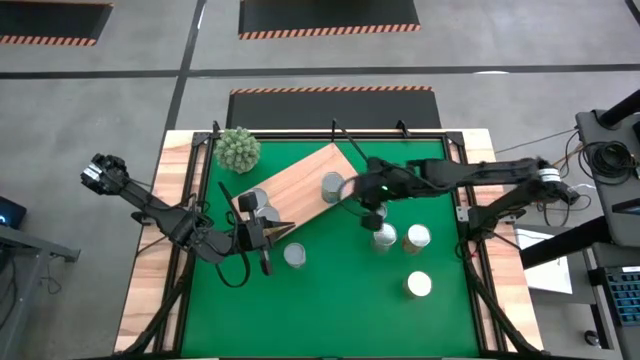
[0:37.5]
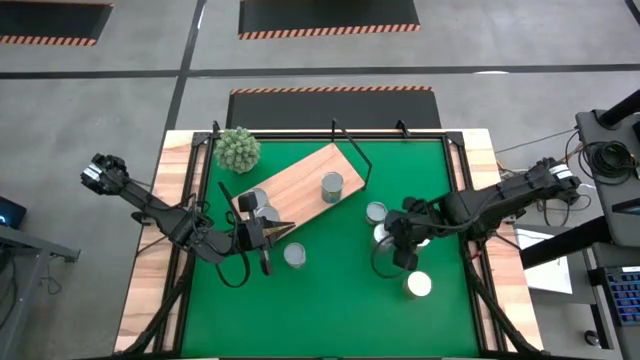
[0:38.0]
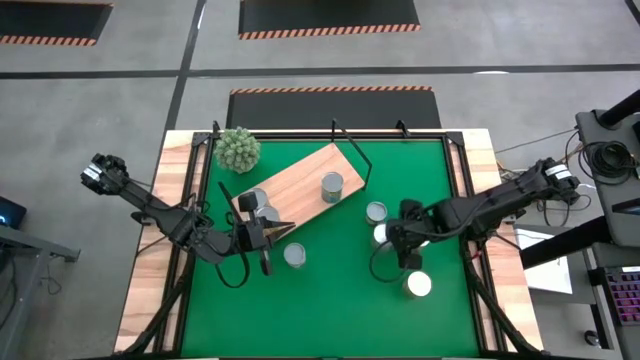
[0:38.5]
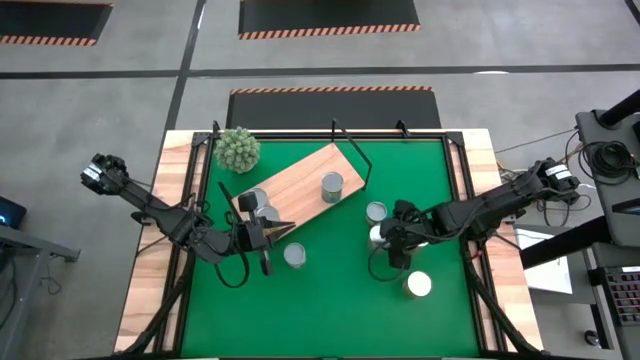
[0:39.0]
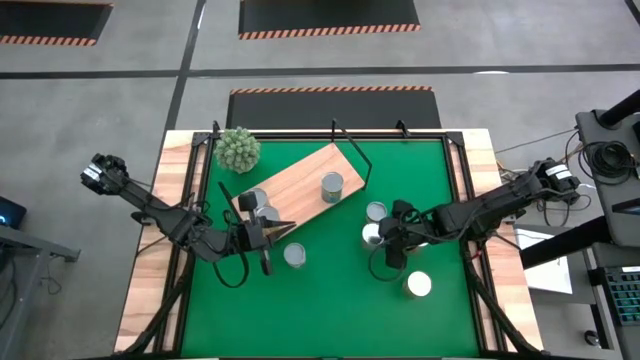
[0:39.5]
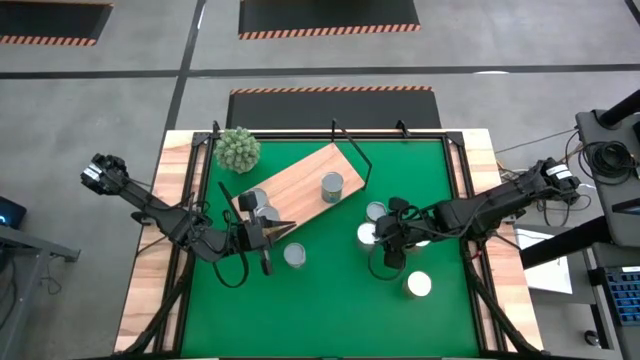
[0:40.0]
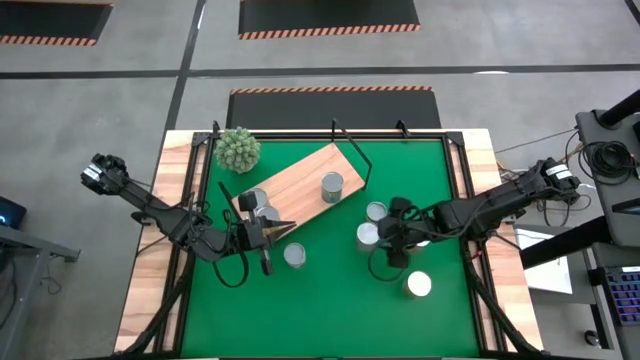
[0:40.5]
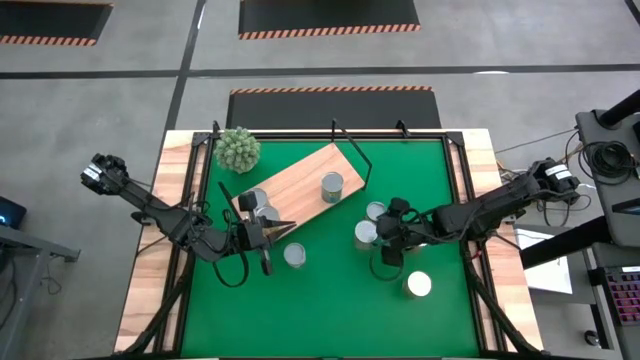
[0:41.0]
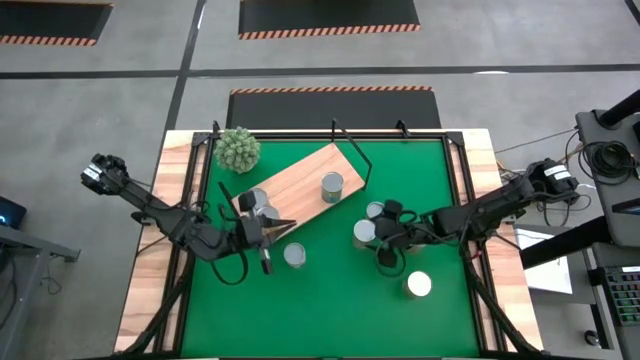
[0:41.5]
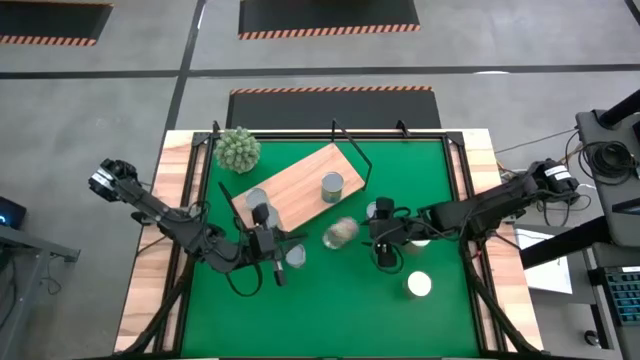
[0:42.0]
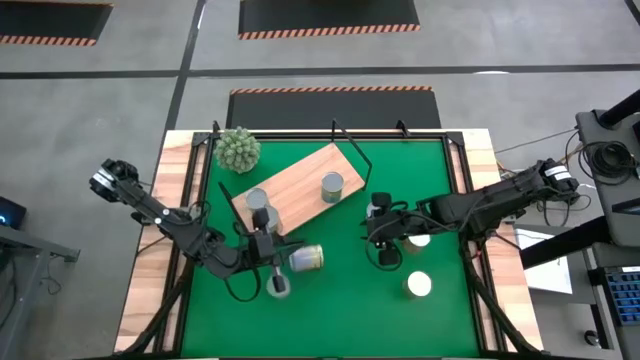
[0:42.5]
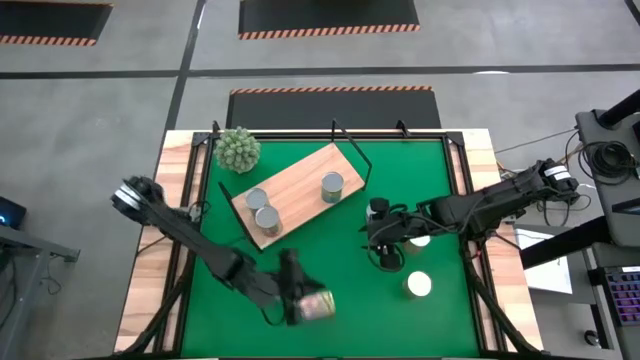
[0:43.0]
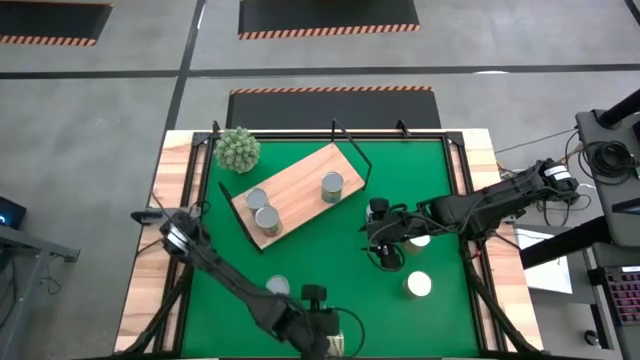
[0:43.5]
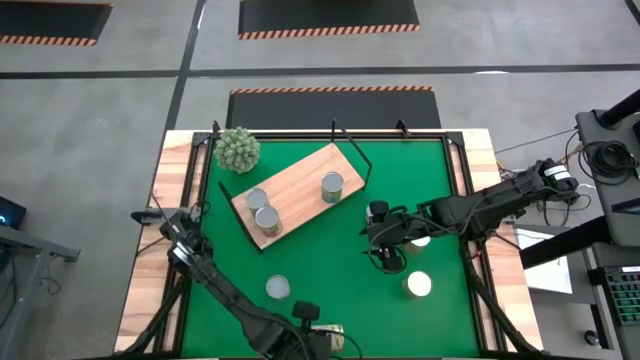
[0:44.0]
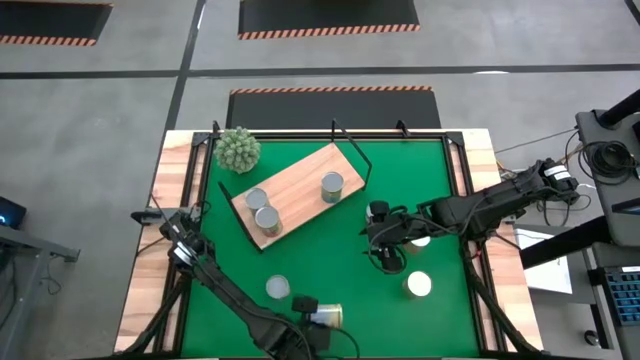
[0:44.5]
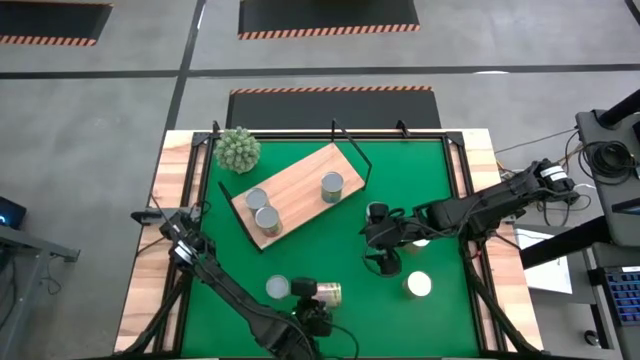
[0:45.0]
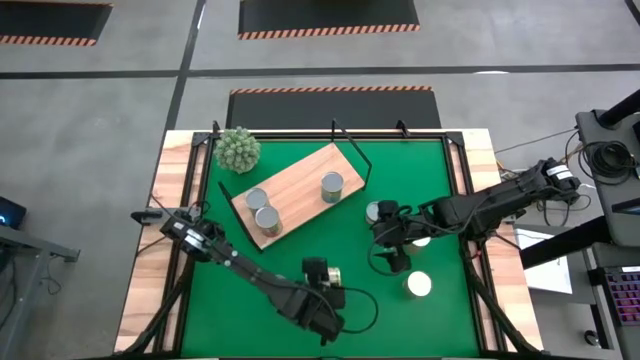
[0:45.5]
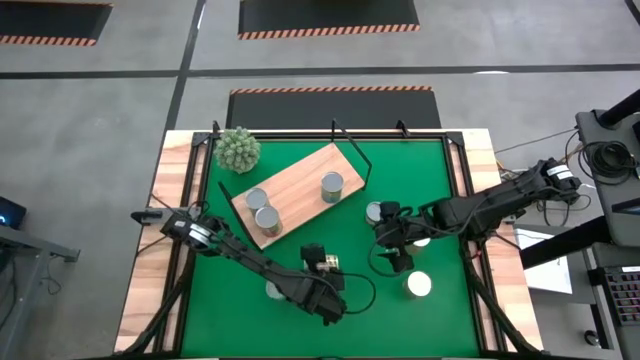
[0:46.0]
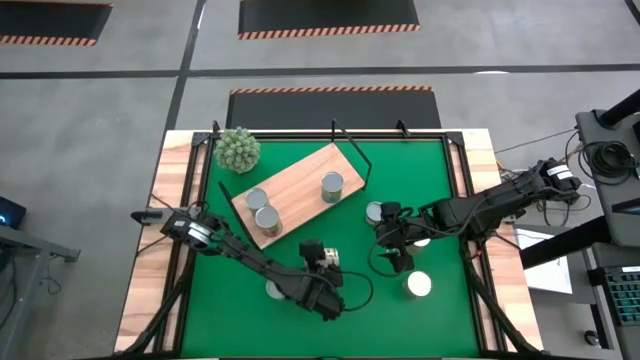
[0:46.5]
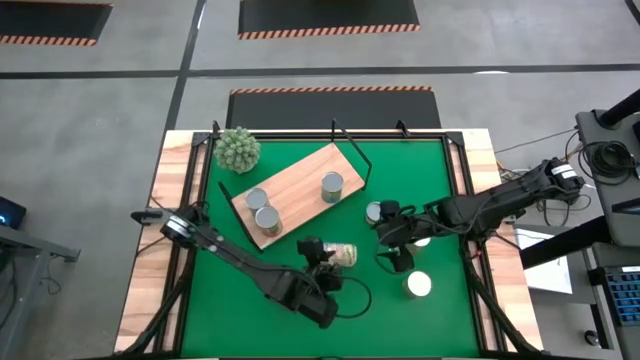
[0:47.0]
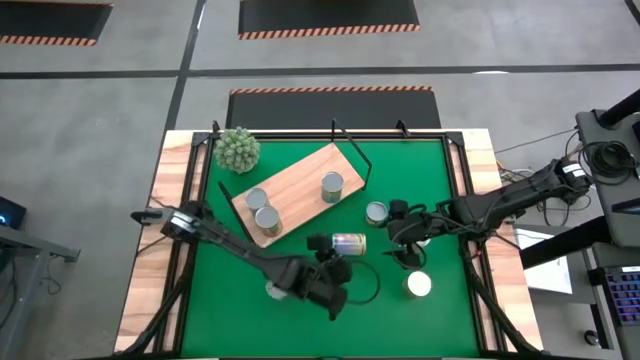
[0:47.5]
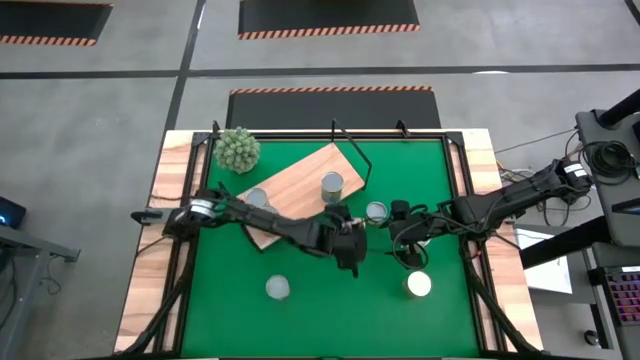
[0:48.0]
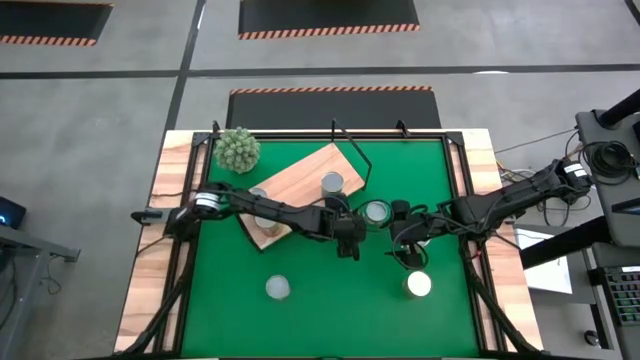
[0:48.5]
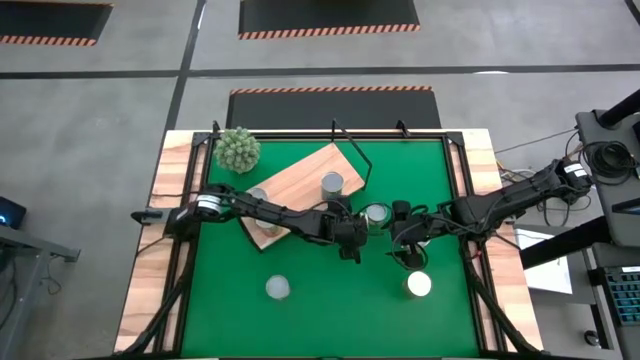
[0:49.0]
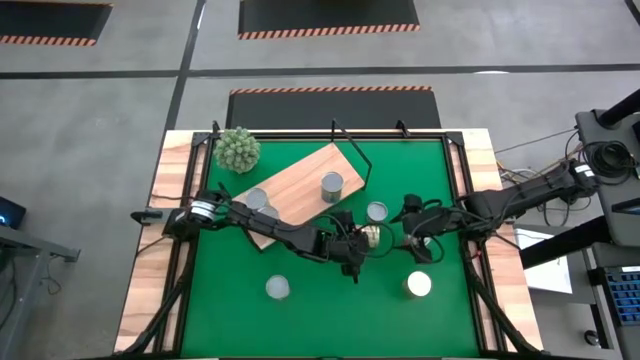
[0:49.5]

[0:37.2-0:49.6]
Task: Pick and place cans onto a shelf
Put the top canned peaches on the shelf

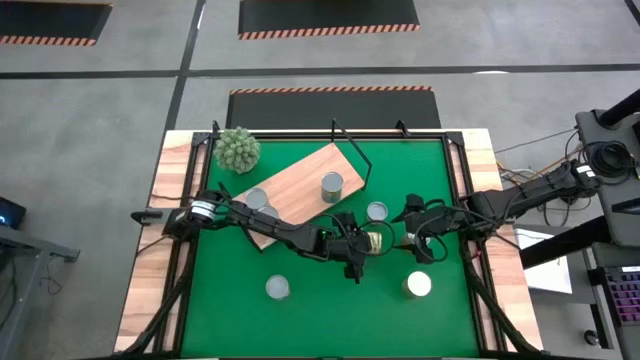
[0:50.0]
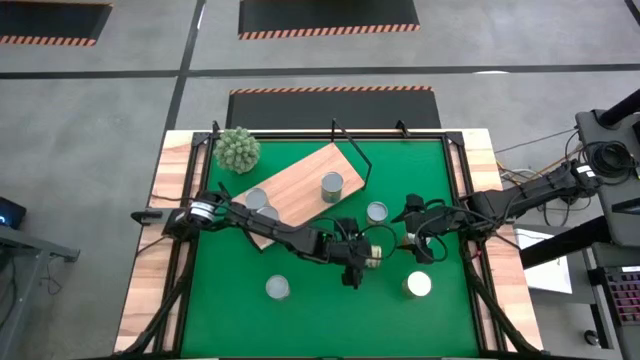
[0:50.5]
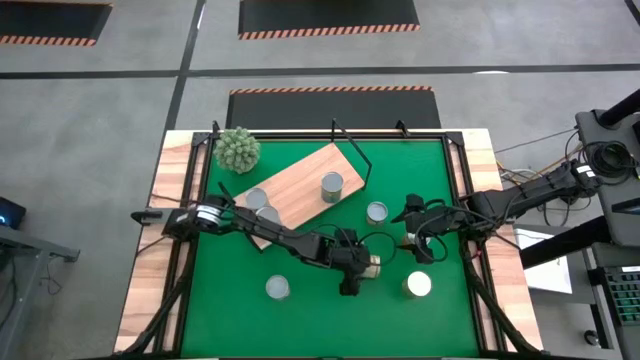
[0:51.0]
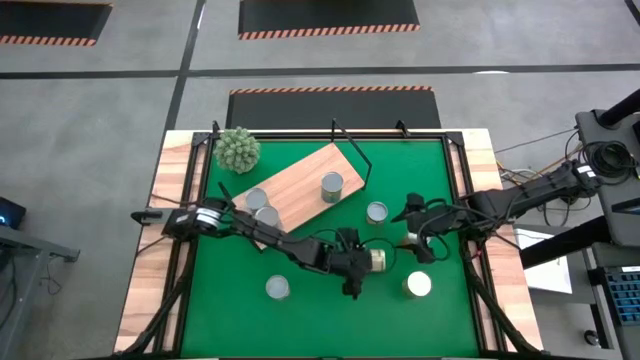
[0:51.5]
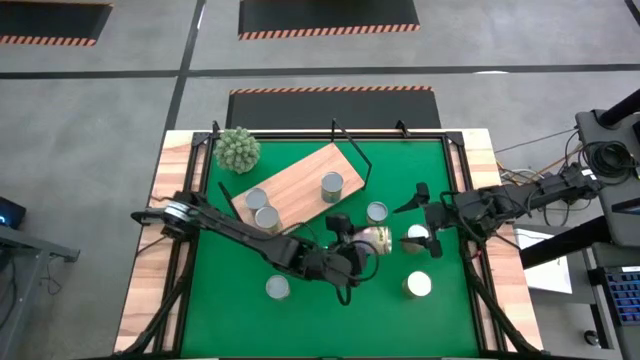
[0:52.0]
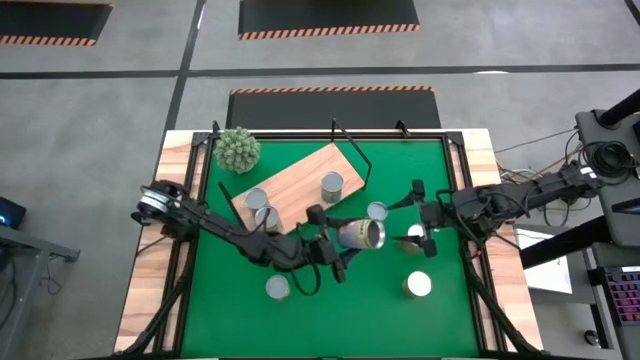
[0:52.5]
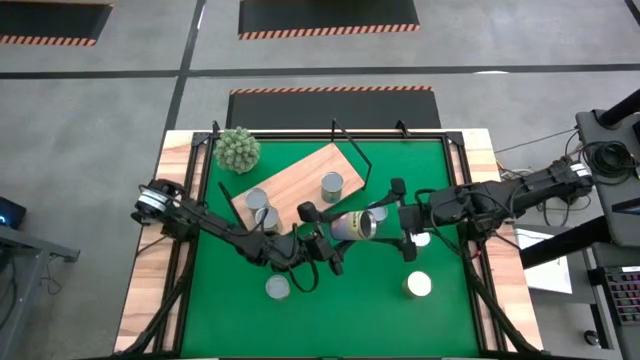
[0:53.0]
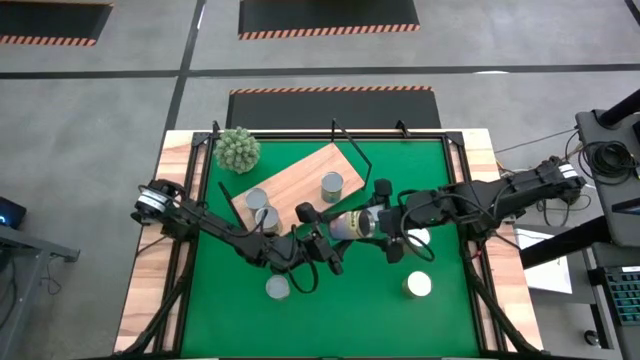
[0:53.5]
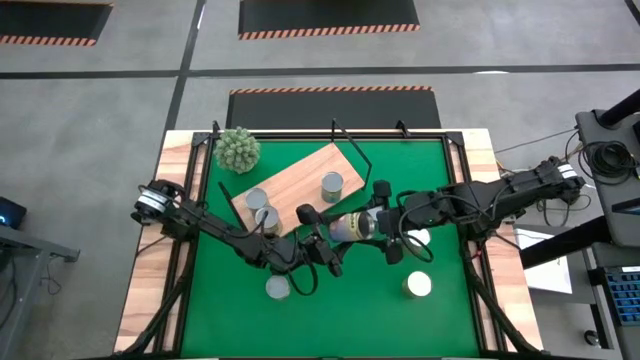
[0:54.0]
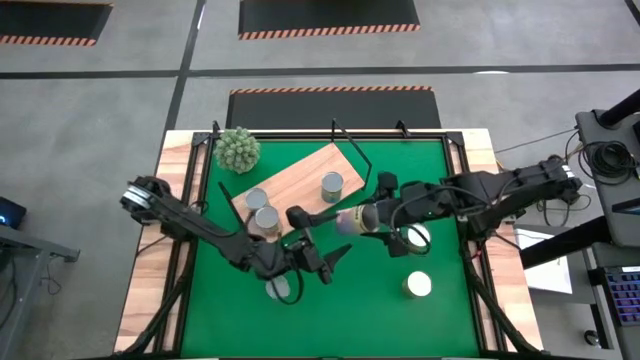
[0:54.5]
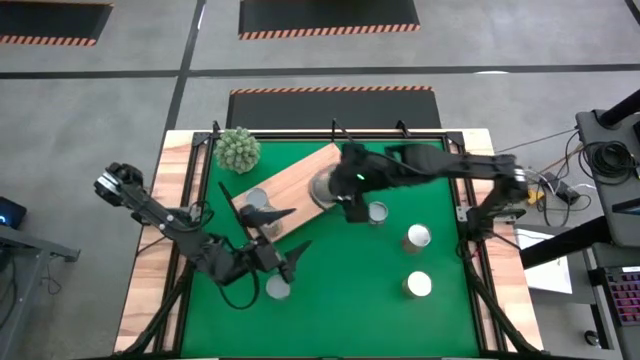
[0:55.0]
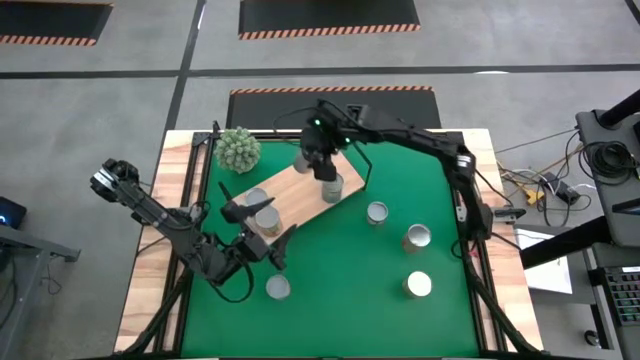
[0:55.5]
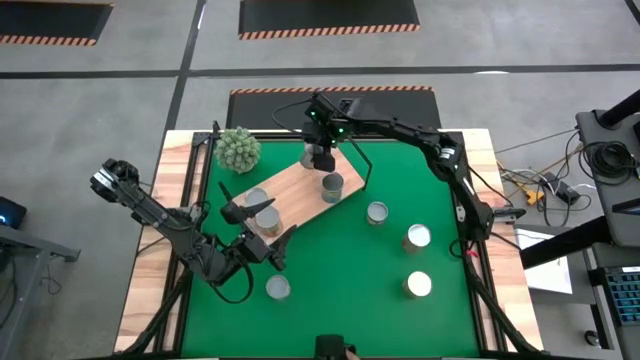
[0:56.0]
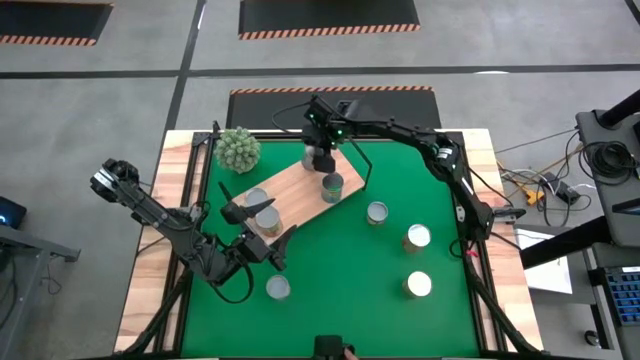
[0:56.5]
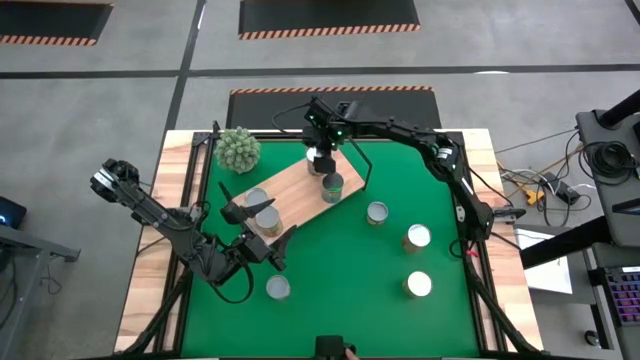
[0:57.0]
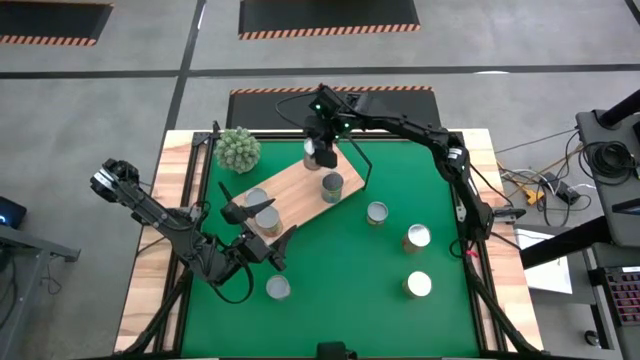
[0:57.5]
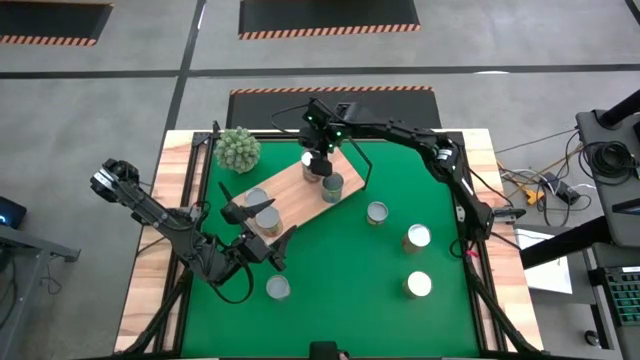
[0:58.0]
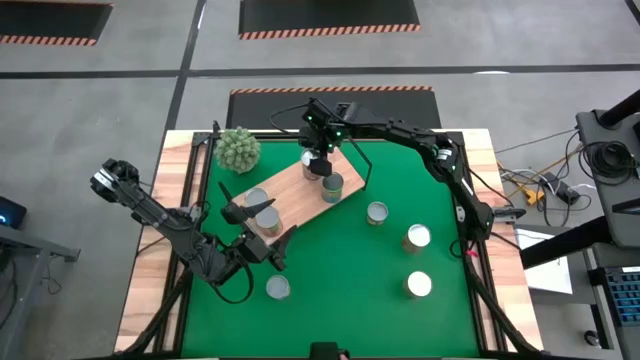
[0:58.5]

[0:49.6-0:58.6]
Put the top canned peaches on the shelf
